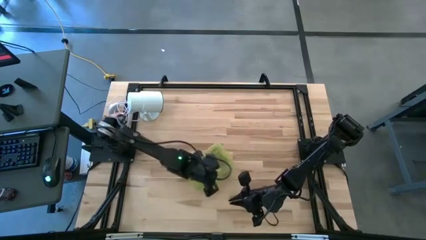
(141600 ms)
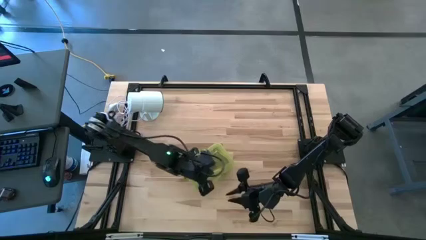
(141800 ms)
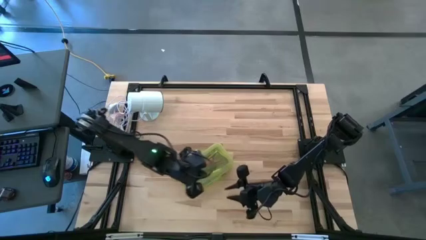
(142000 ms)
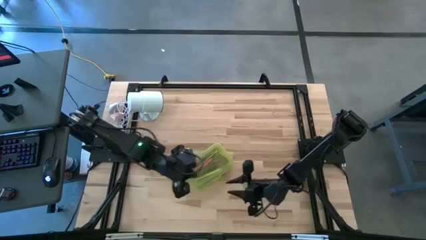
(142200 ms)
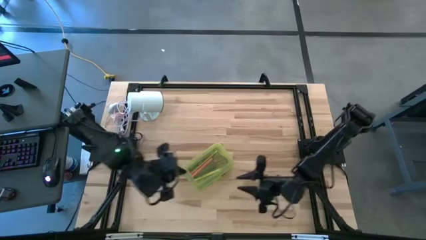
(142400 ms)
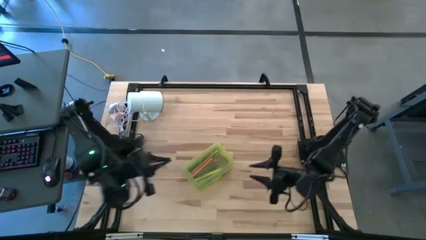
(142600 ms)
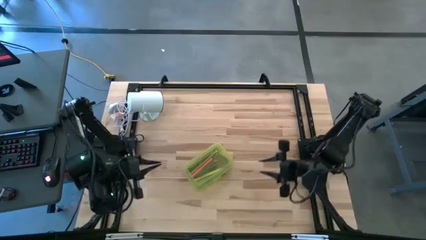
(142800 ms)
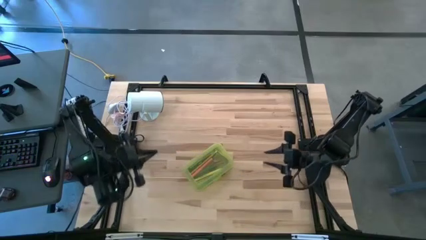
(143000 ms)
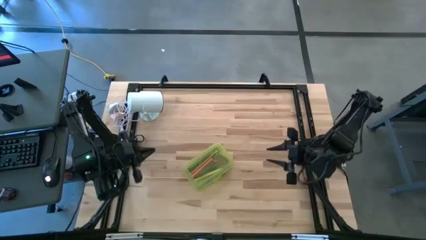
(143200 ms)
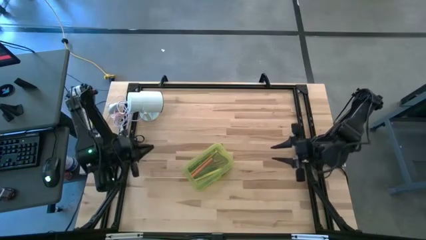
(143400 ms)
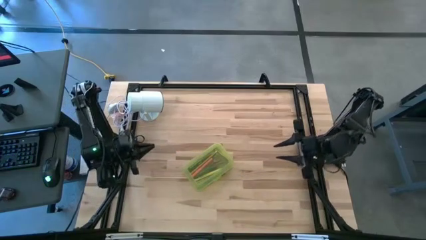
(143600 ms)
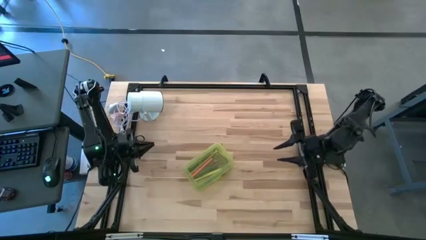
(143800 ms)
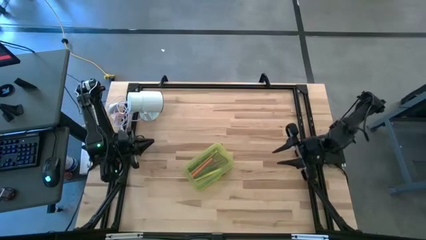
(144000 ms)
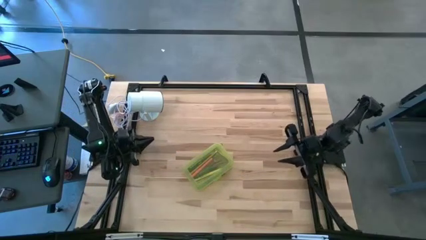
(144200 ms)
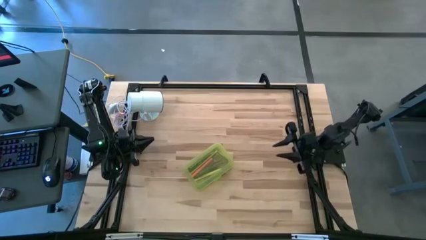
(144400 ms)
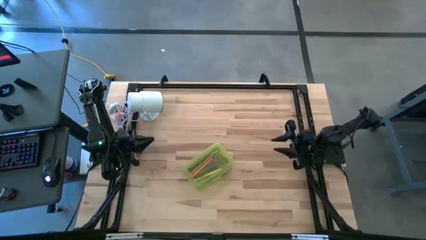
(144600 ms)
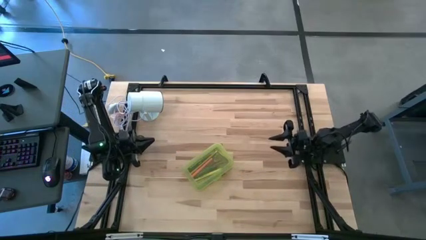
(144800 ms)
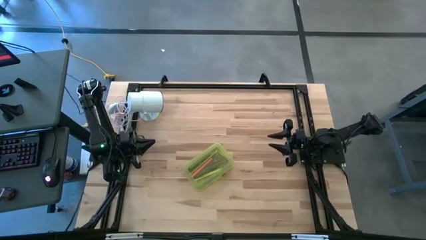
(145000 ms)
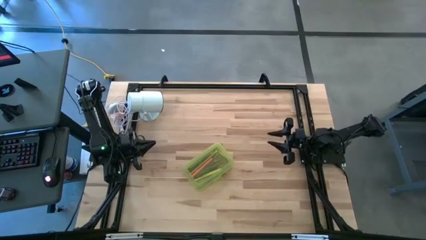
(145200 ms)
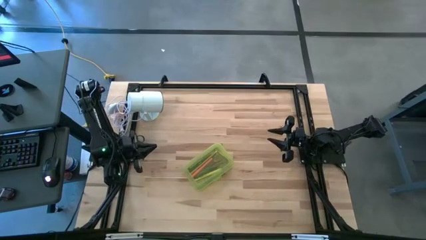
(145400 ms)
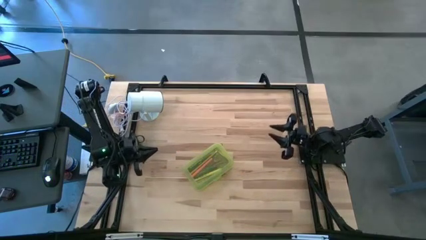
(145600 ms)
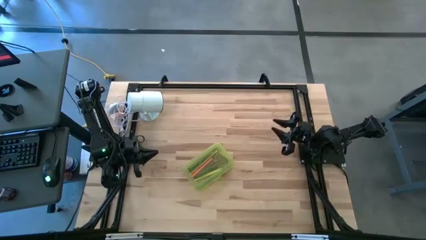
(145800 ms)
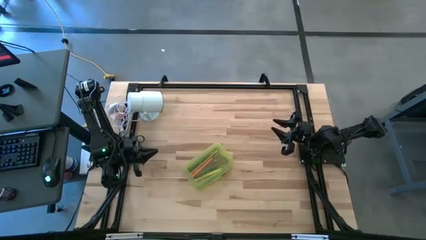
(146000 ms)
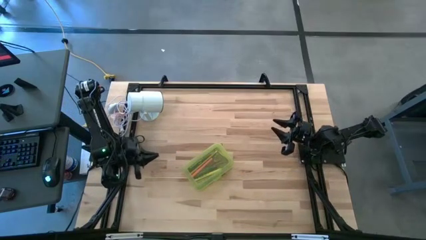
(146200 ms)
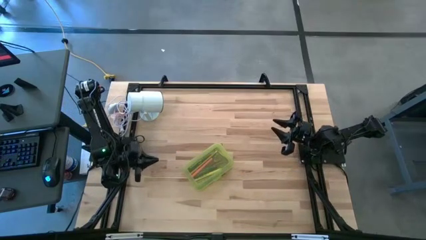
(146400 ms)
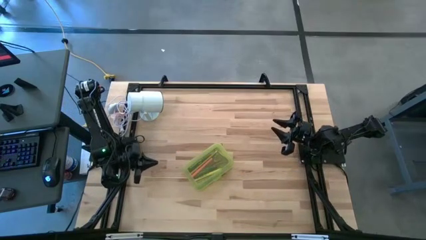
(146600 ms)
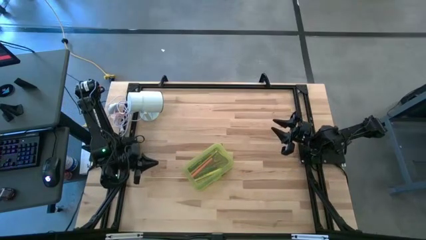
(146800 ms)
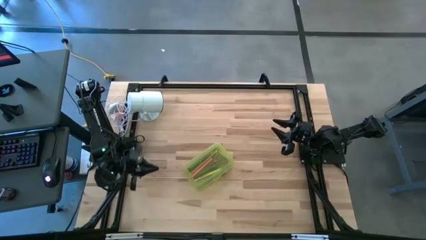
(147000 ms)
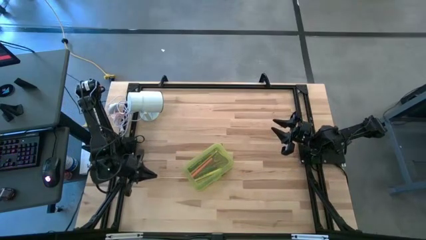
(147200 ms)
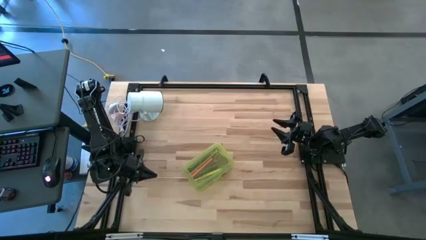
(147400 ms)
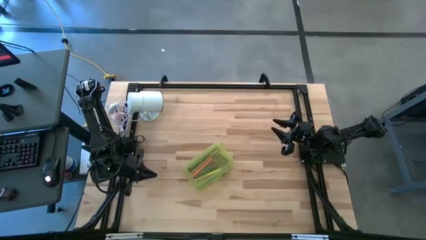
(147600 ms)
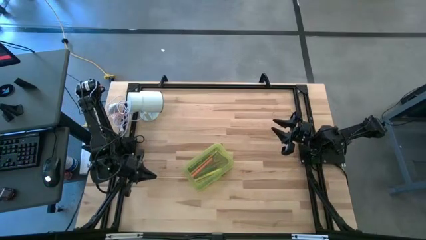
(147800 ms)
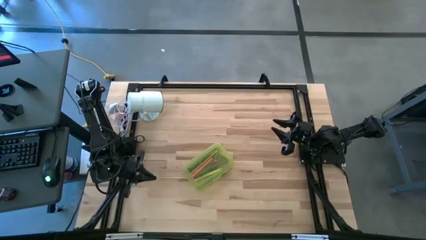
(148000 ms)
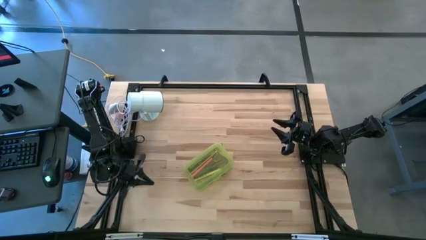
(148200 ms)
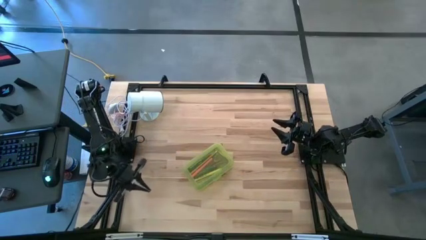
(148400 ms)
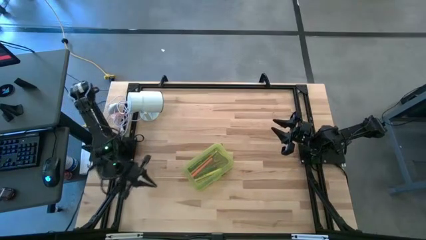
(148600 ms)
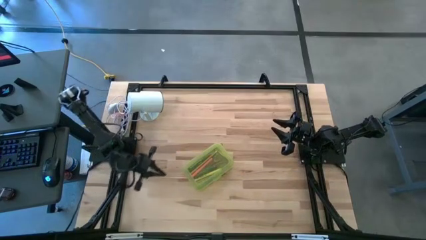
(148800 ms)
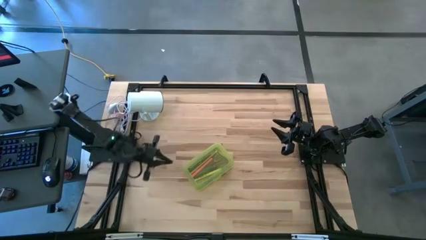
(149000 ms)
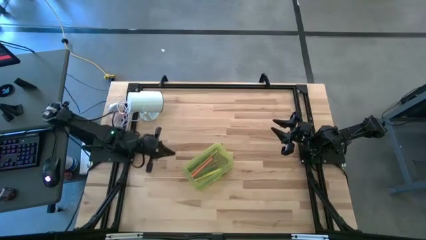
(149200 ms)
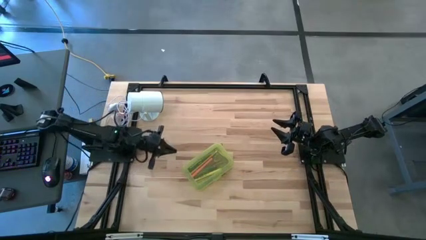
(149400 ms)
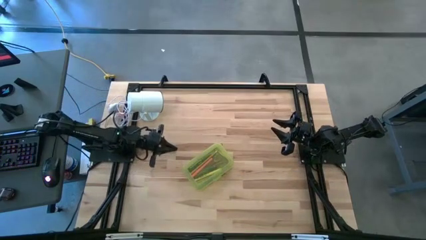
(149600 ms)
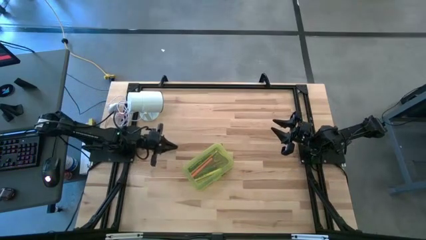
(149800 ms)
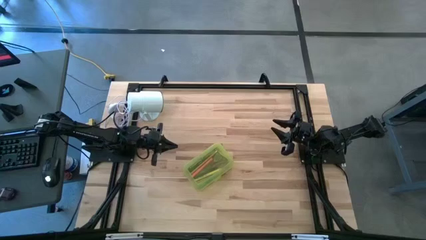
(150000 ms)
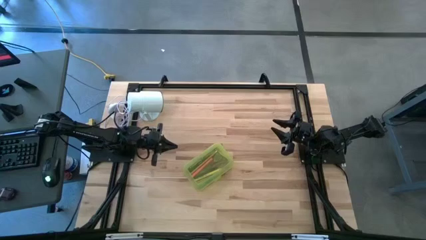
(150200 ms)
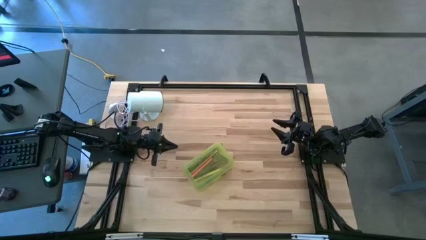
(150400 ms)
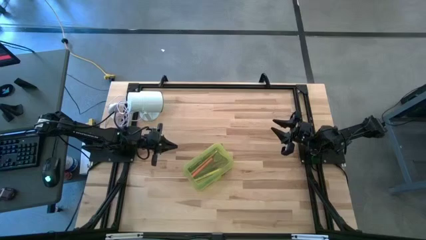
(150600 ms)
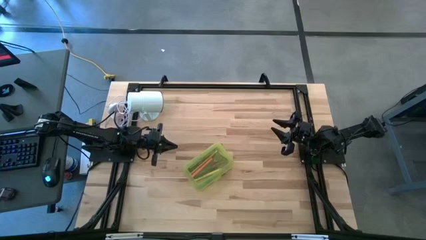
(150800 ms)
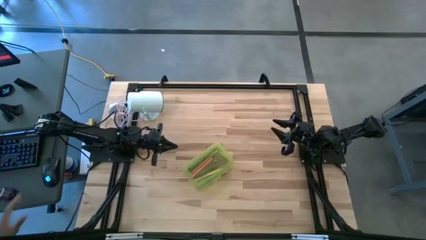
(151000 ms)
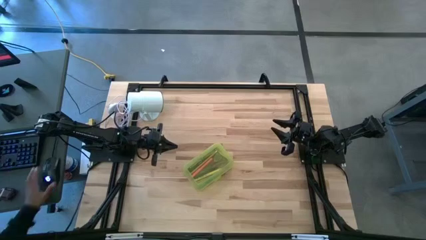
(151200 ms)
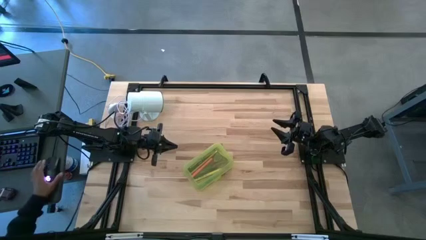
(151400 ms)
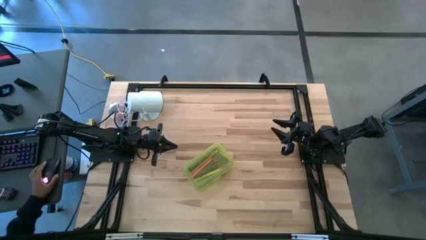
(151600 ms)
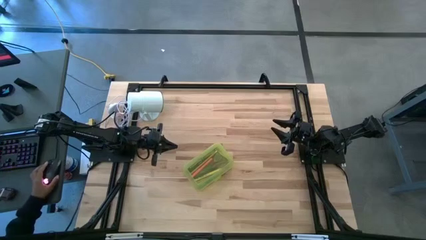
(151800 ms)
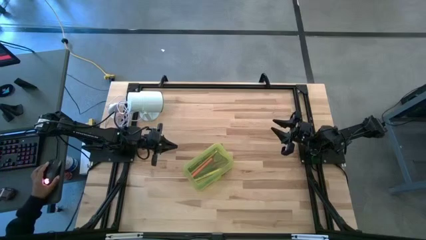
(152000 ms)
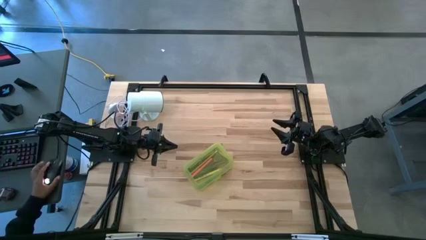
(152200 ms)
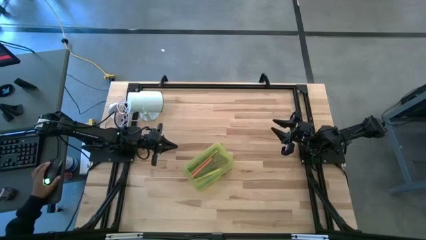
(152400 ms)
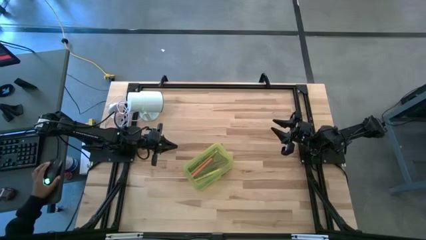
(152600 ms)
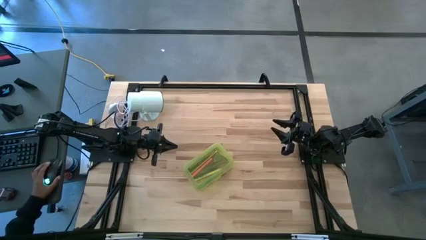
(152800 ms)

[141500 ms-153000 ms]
Task: Pick & place school supplies into a supply box
Return to Home Position
